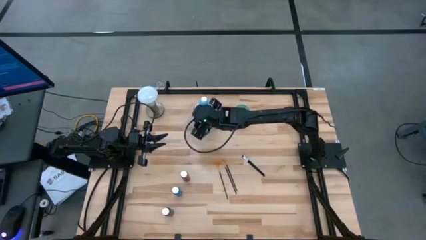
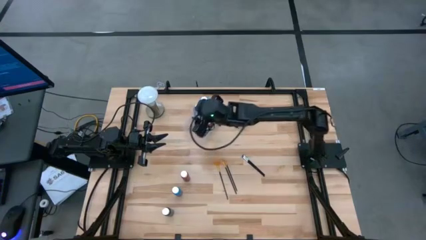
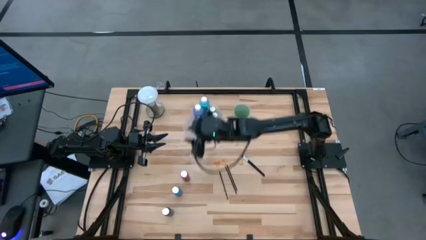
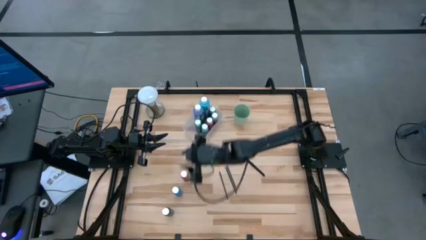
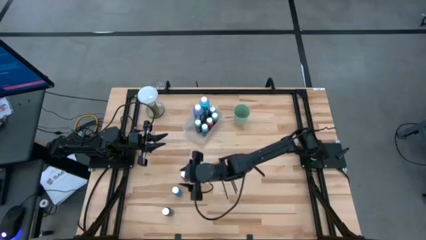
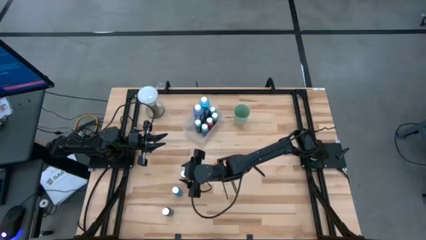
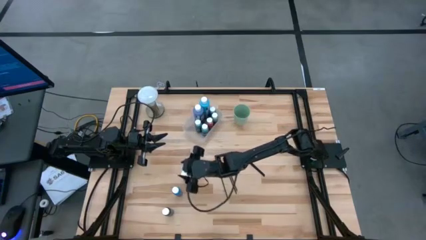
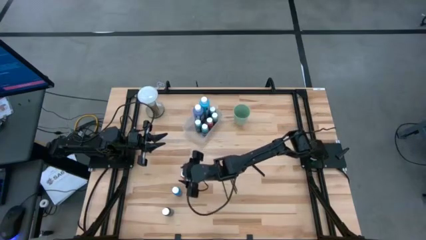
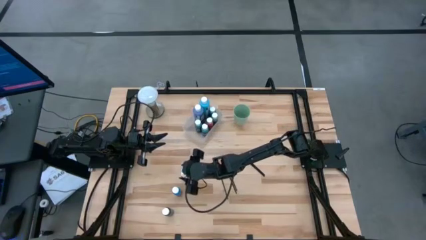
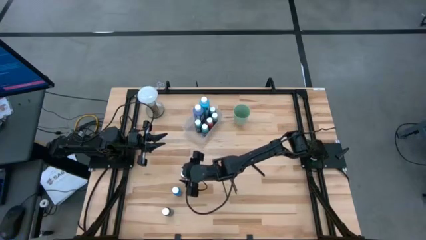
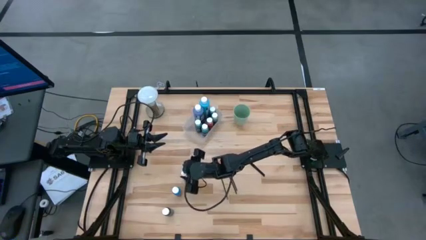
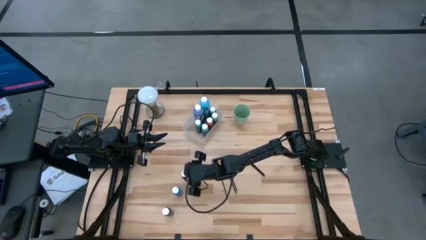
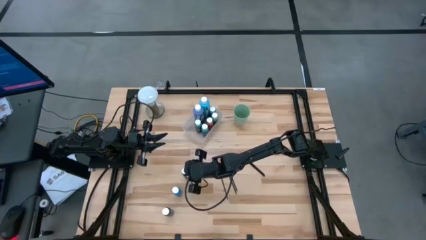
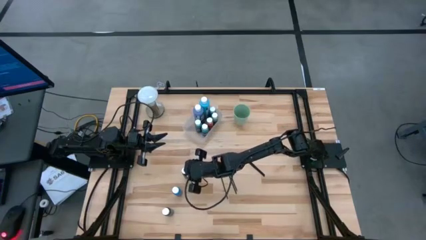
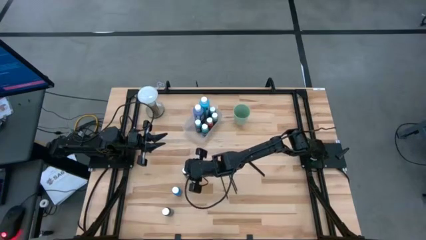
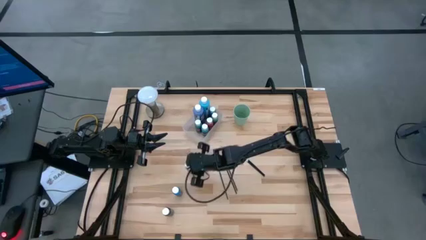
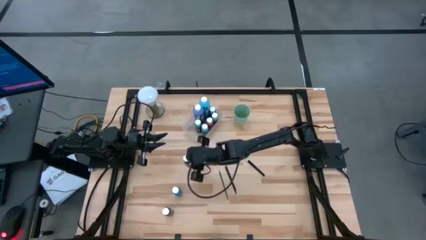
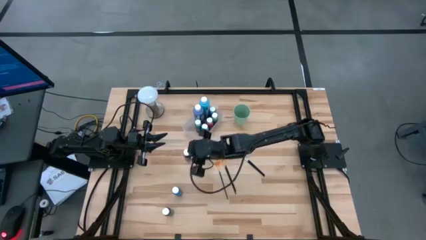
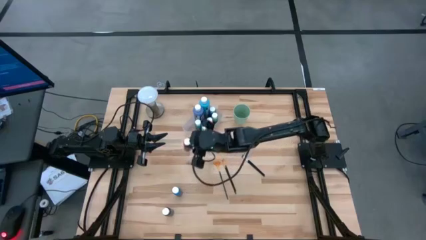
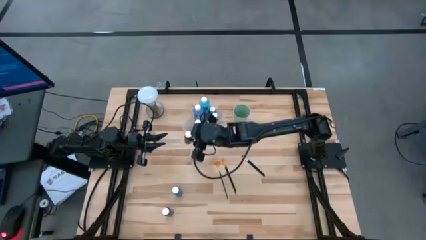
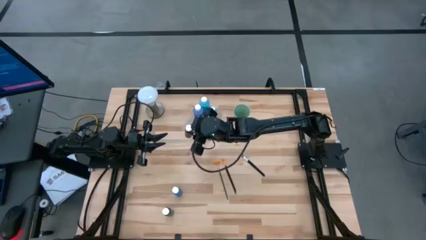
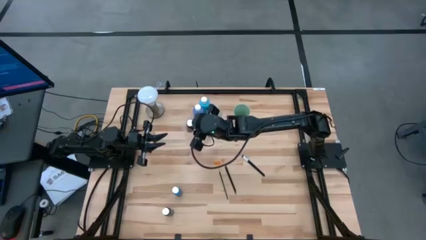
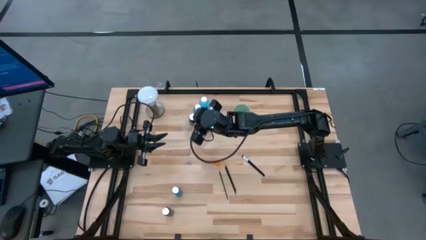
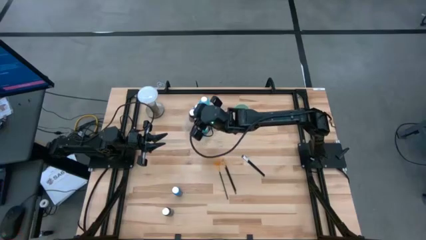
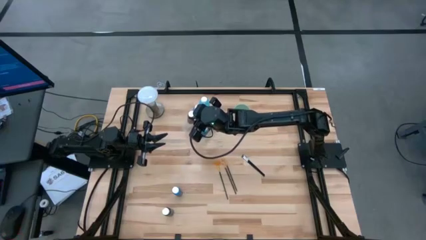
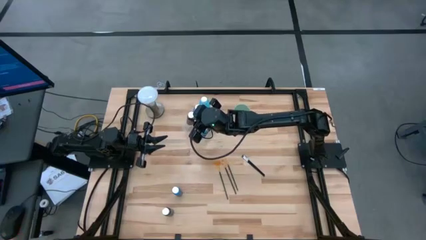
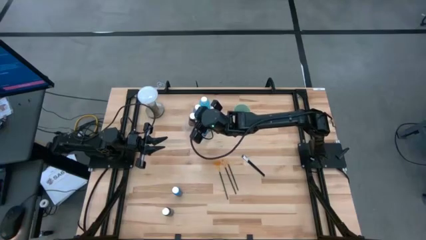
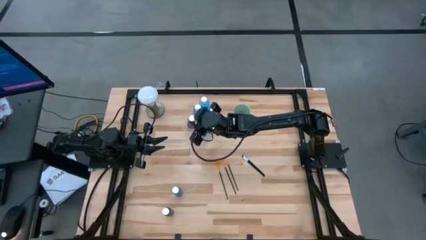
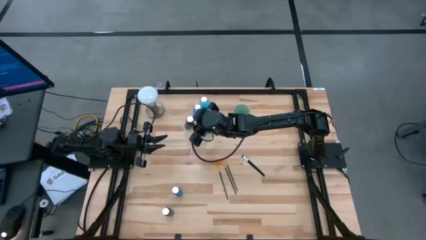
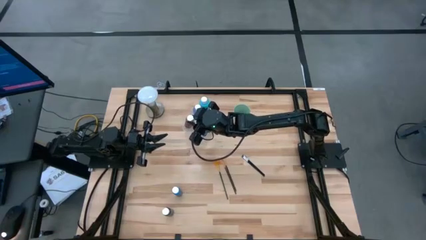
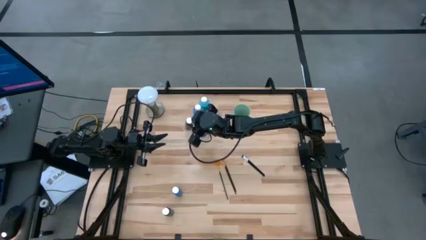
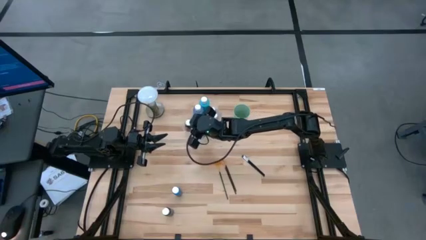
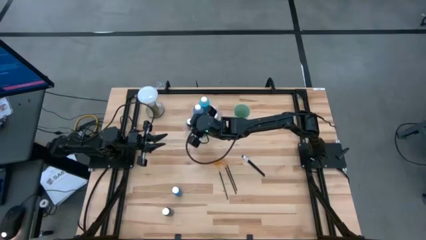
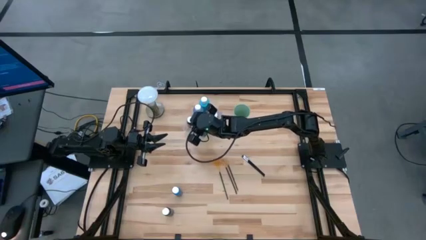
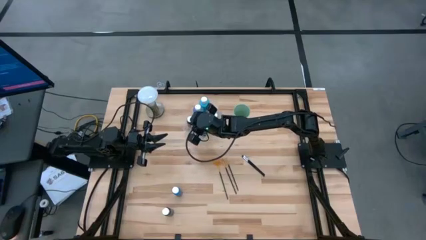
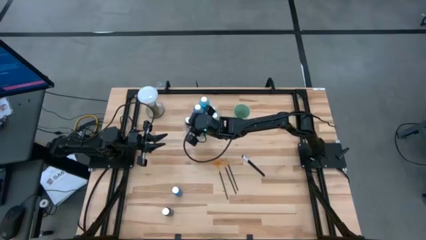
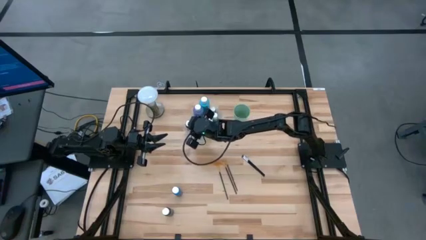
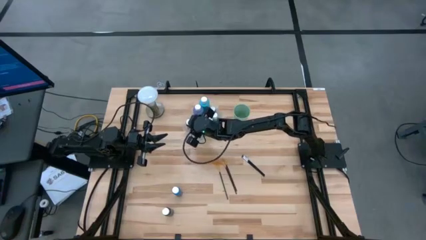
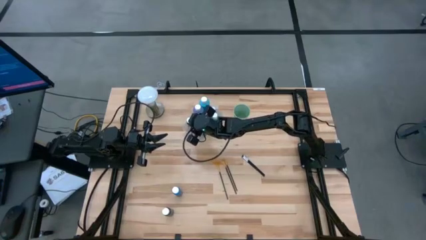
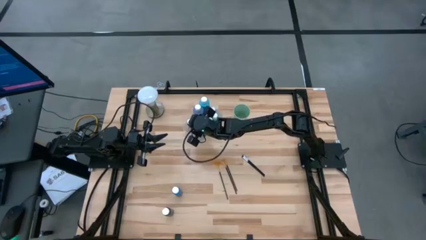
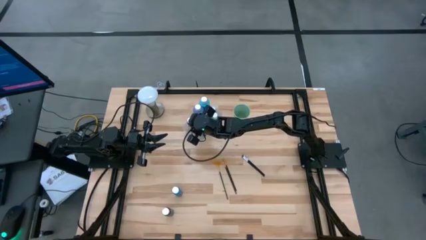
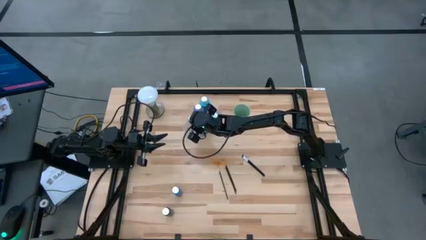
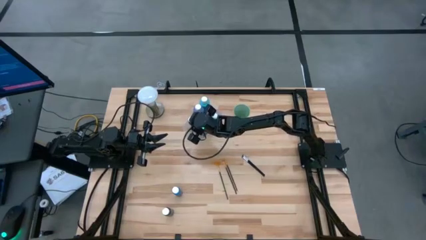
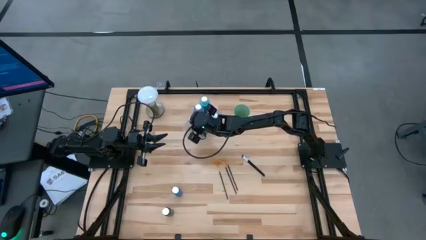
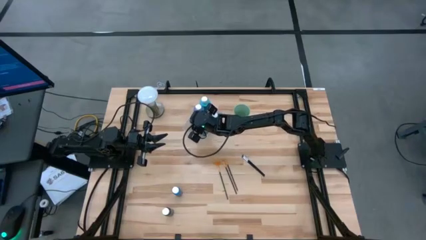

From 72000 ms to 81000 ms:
Task: Pick & Place Paint Supplies
Put the small red paint bottle into the transparent bin

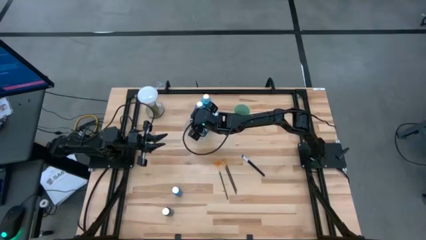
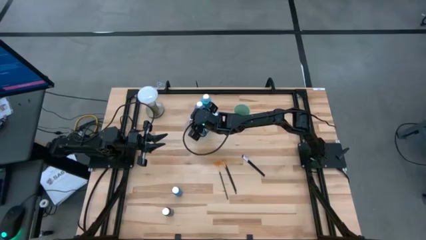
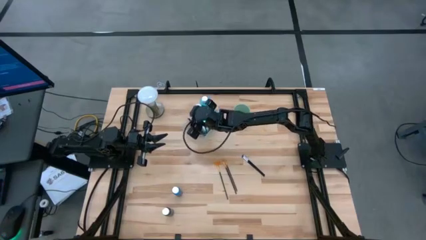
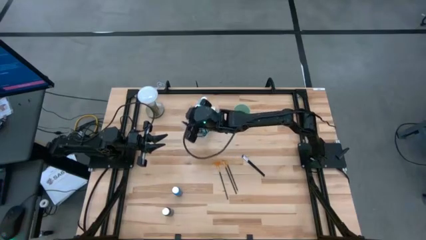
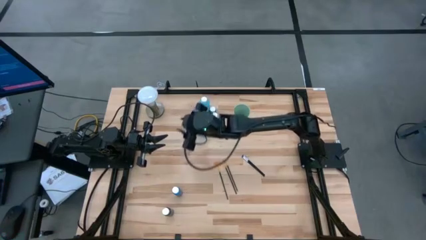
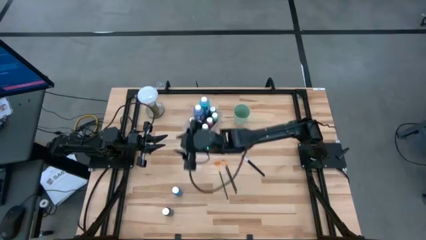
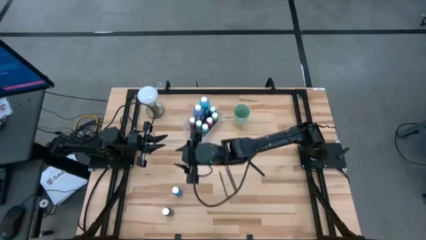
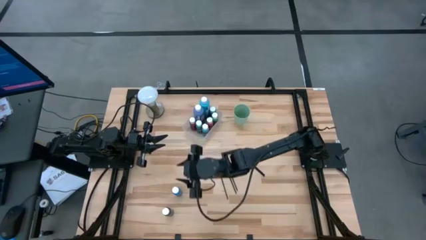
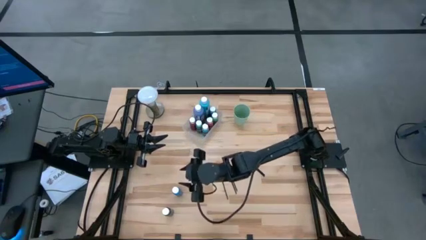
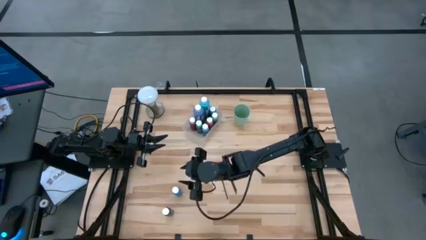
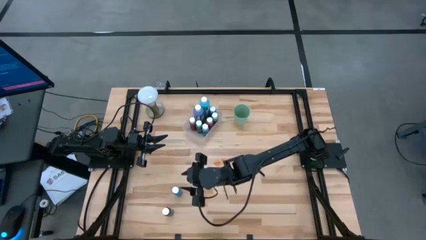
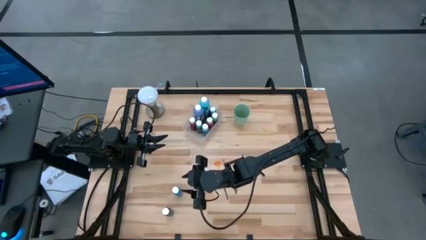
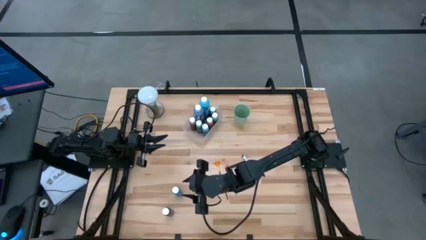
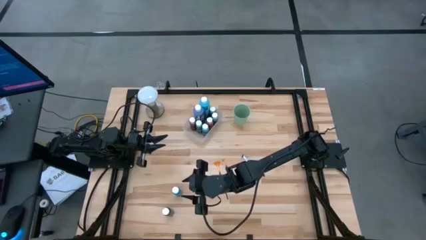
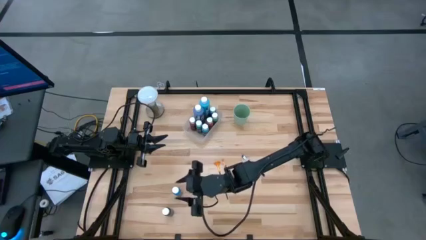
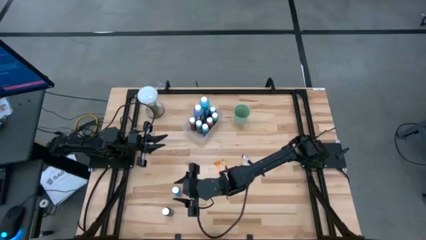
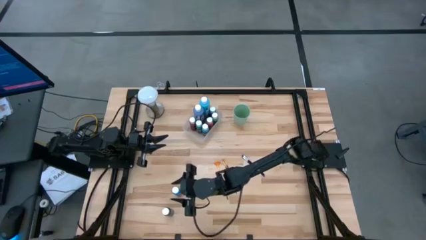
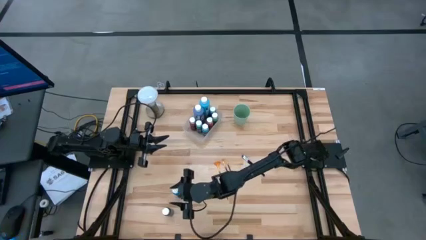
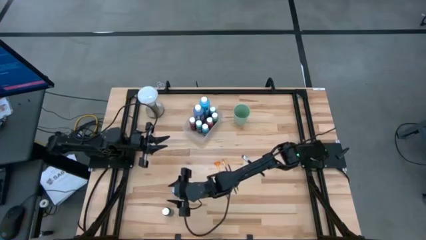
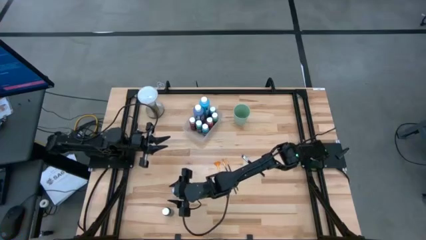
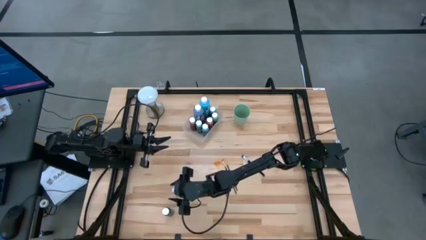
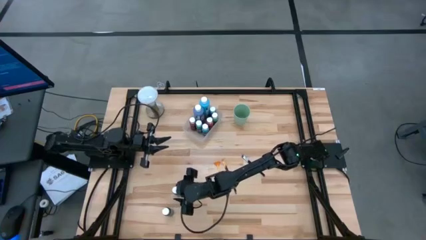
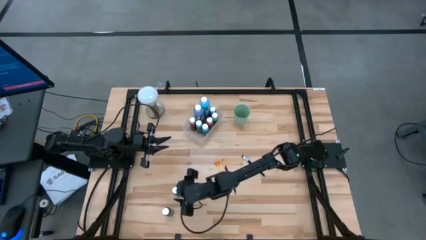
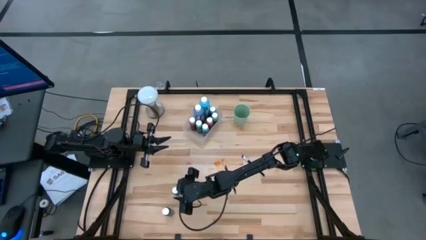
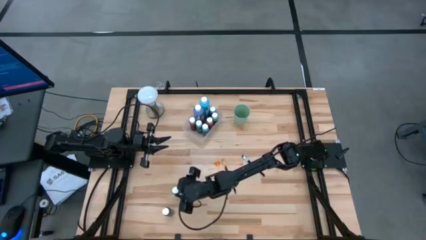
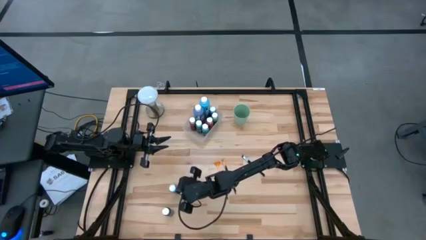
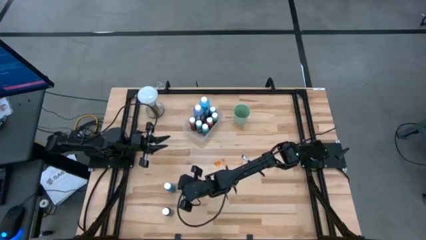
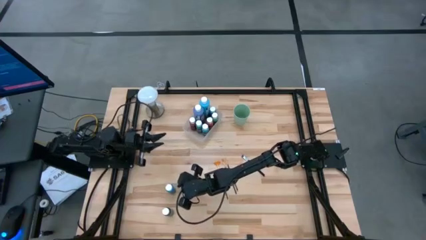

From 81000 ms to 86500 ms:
Put the small blue paint bottle into the transparent bin

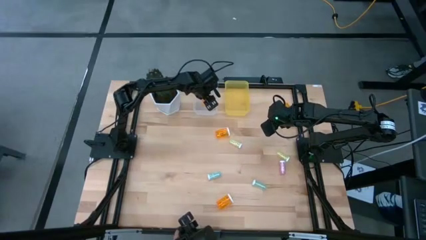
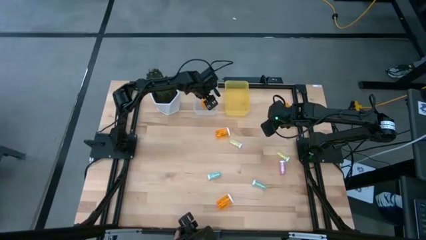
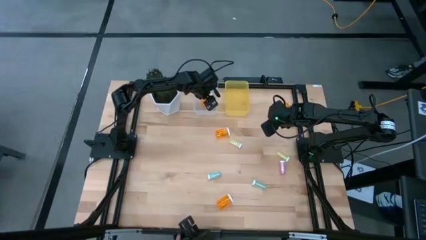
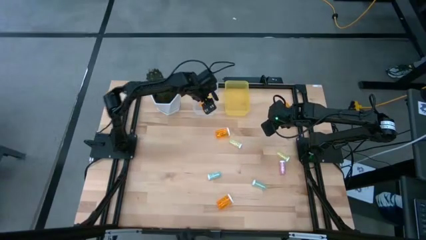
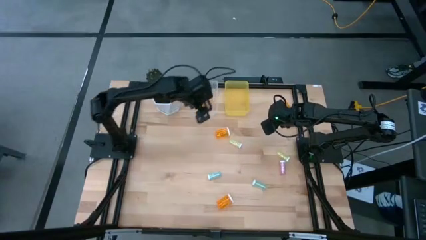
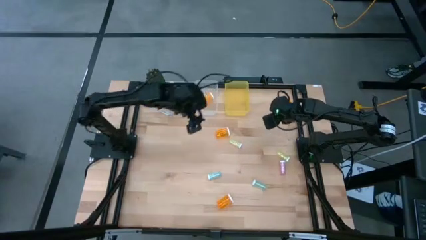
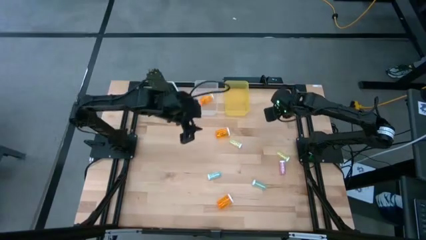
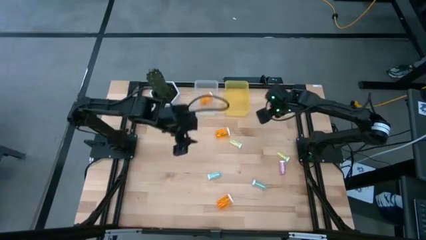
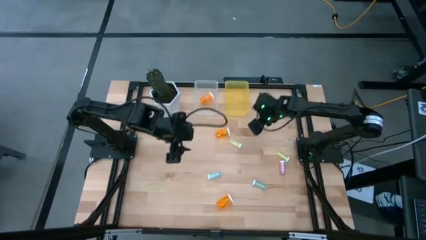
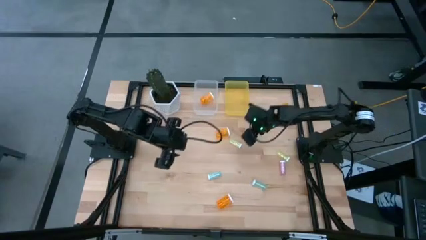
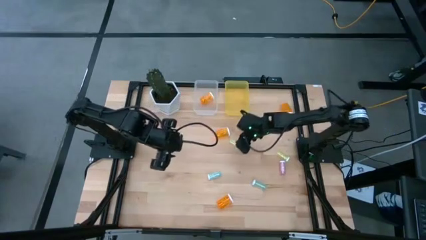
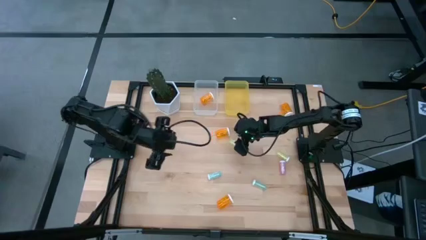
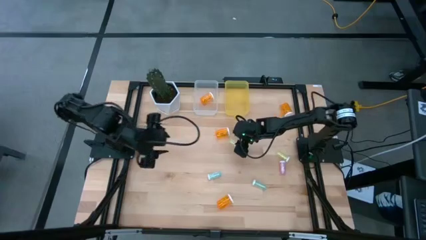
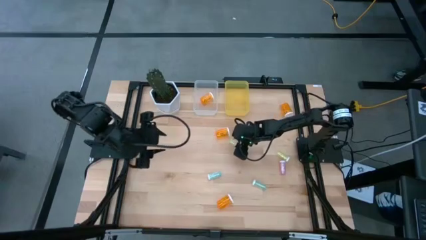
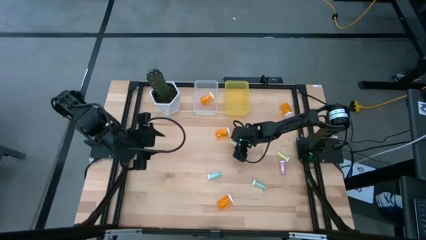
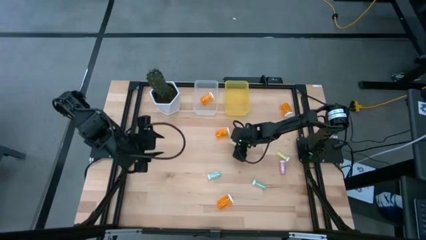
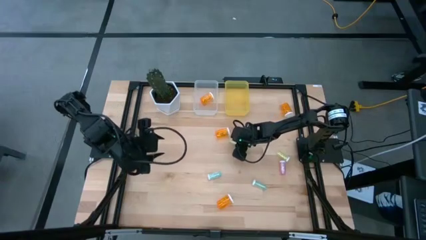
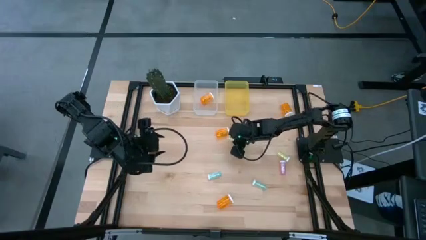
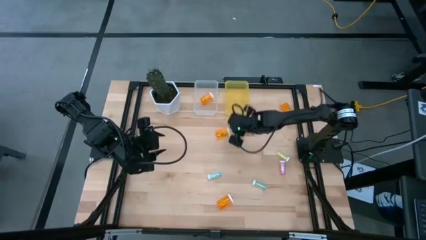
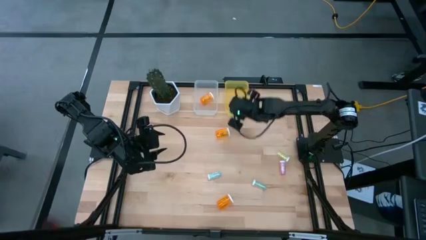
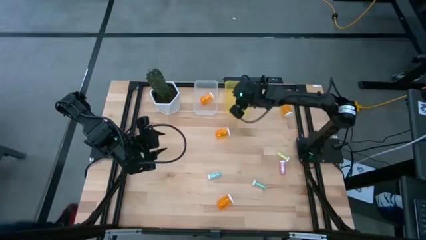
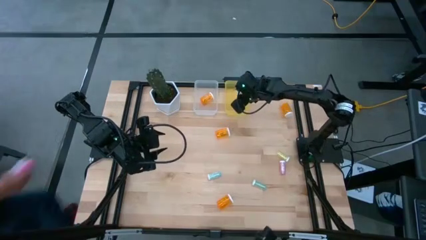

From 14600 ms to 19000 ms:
Task: Pick and place medicine bottles into bin by pill shape (circle, oval)
Put the left yellow pill bottle into the yellow bin
